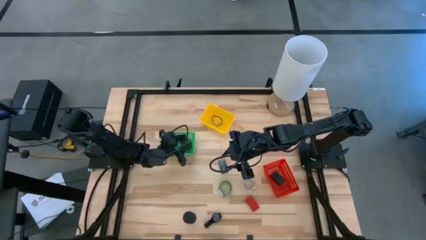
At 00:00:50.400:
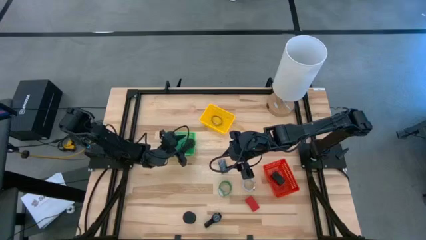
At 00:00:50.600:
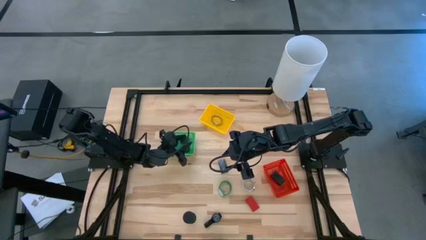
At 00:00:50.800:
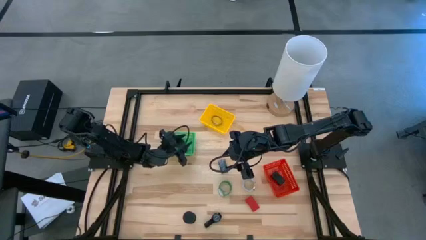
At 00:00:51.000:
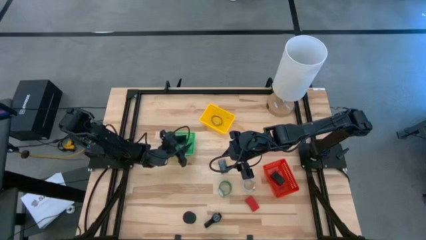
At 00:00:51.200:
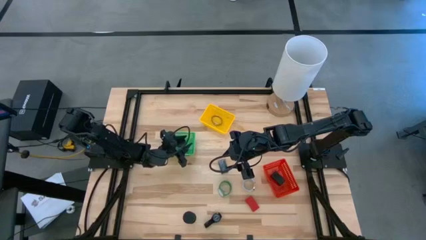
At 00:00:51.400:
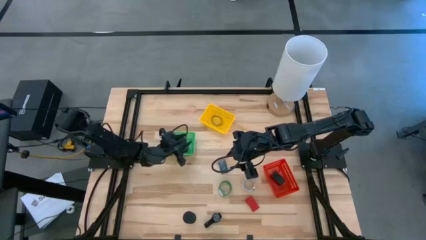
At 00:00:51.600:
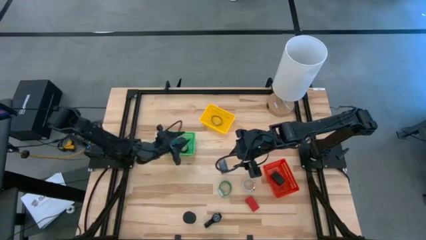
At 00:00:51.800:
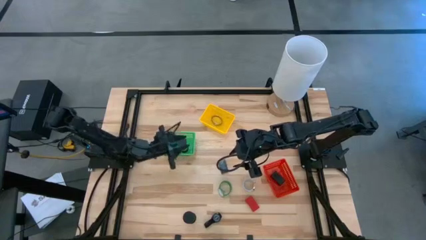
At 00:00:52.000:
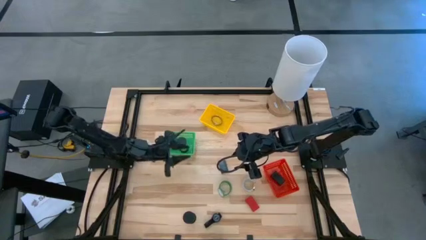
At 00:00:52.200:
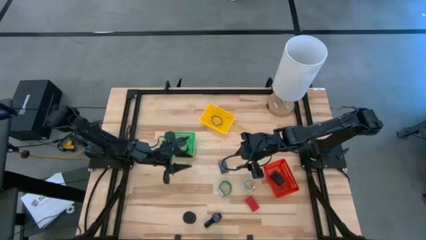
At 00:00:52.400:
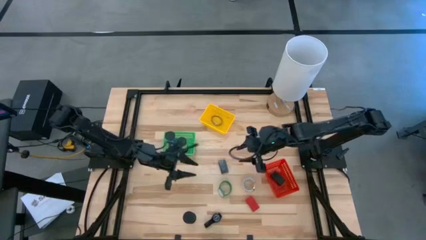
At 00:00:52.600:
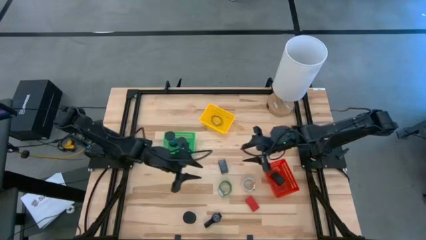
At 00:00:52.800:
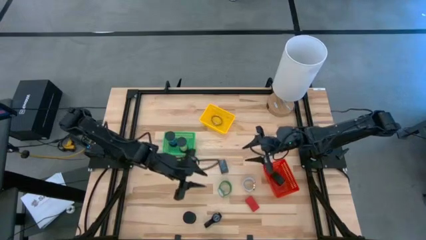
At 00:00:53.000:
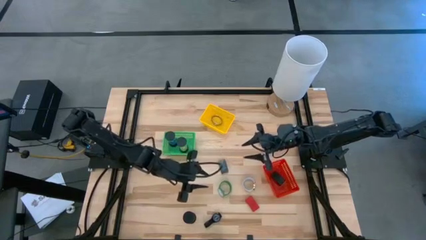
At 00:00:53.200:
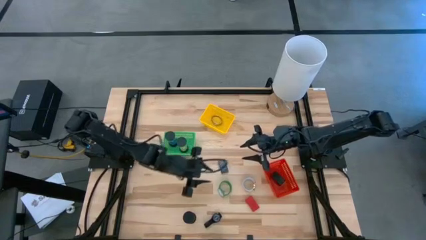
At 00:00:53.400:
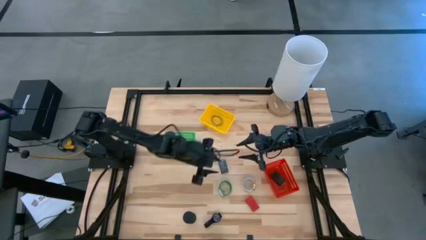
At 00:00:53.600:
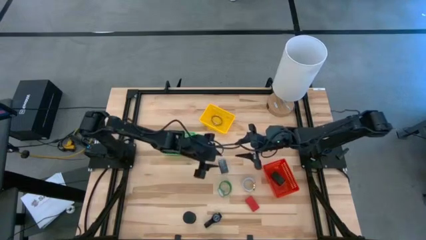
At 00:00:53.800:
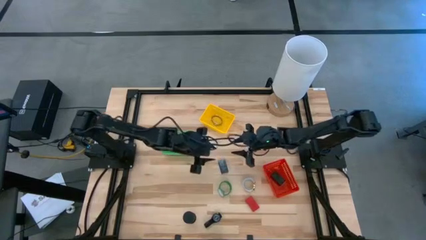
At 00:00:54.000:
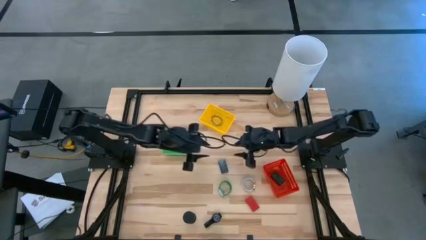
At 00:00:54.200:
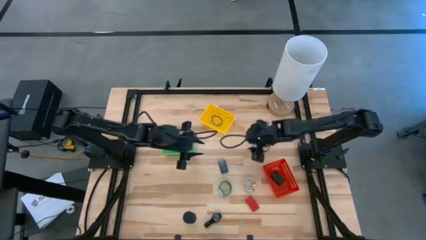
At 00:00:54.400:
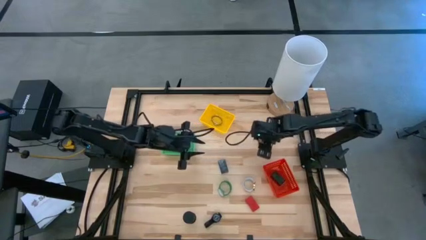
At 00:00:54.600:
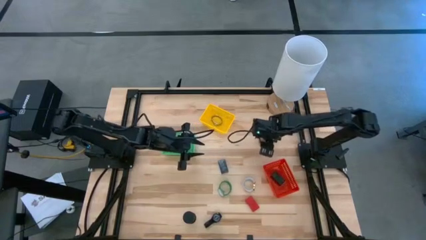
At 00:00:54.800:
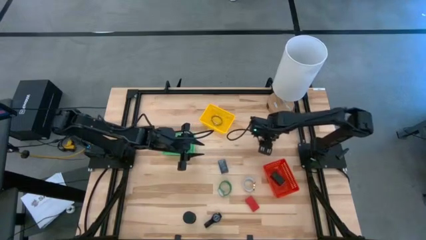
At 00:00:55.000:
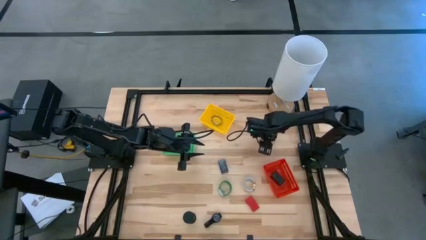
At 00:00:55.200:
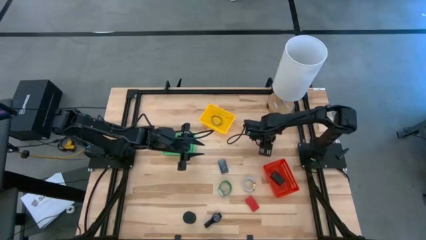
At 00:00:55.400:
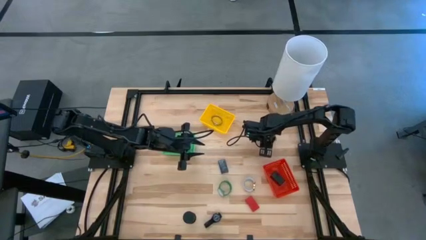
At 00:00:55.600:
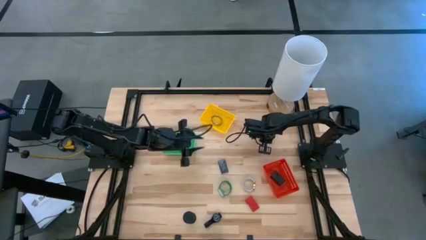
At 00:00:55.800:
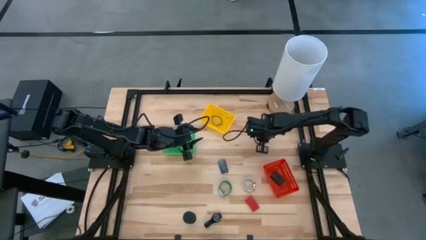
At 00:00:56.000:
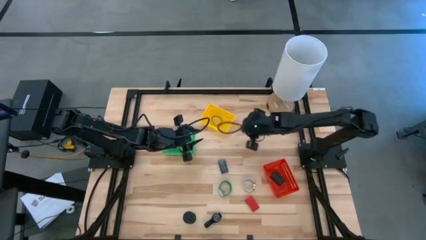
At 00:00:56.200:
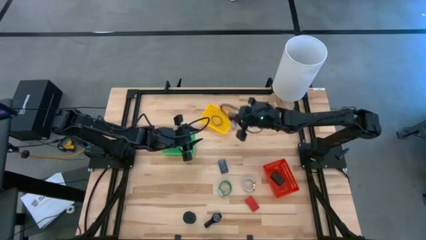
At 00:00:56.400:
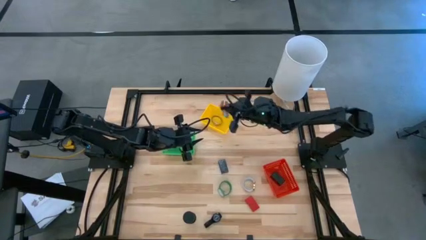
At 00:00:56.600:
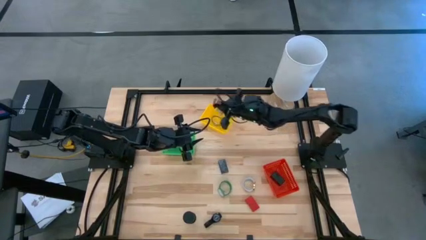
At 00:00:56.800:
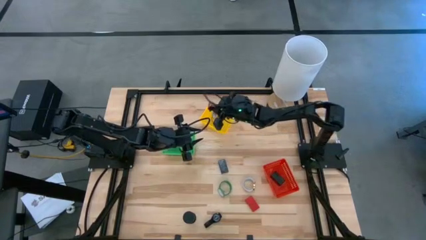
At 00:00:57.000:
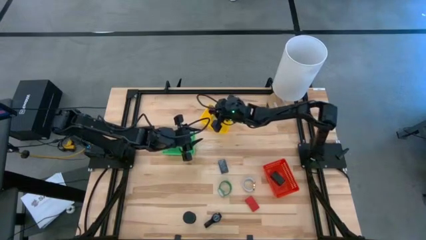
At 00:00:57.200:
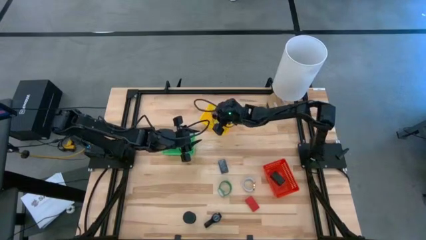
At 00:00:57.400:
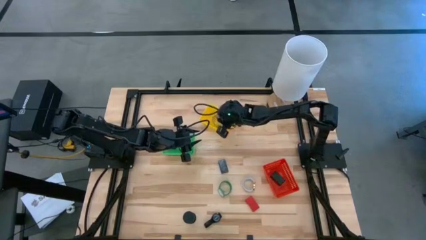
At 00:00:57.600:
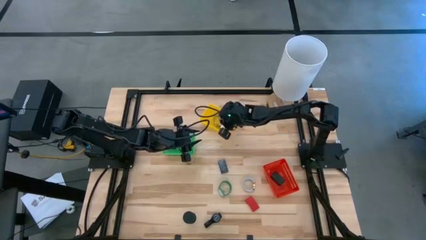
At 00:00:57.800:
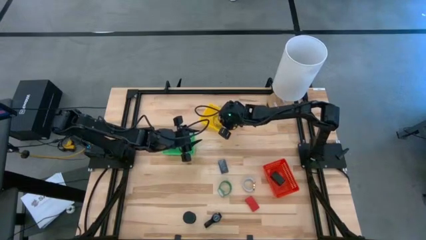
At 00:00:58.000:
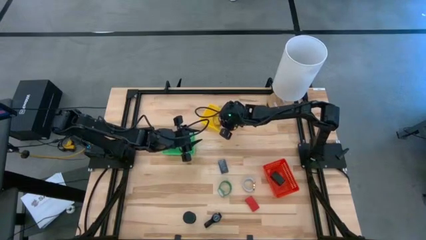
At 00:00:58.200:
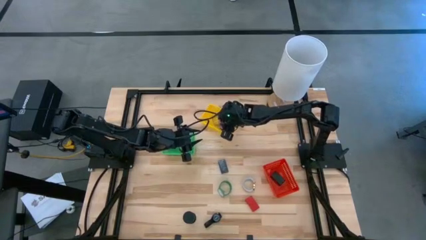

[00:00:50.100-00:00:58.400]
Task: Pick & Place Office items
Put the brown watch into the yellow basket

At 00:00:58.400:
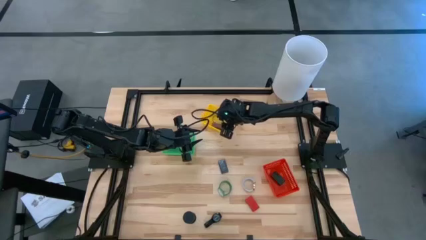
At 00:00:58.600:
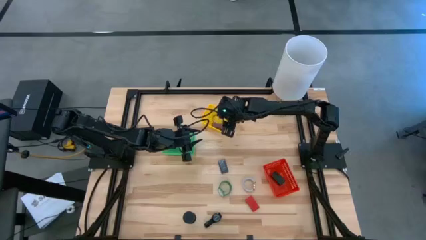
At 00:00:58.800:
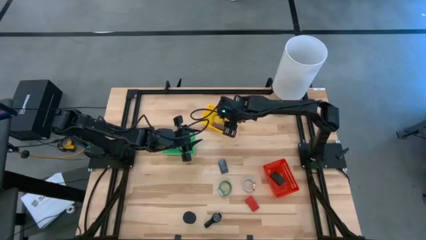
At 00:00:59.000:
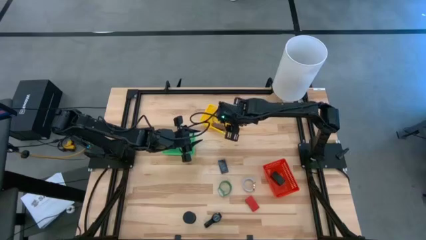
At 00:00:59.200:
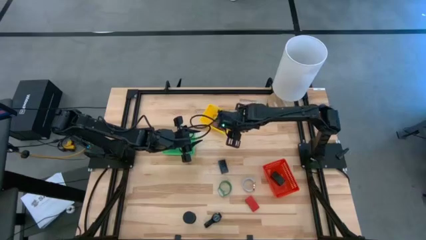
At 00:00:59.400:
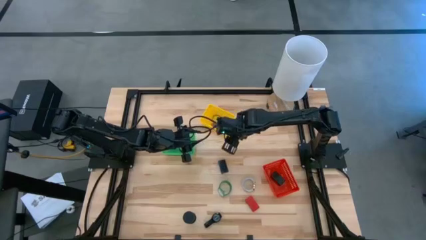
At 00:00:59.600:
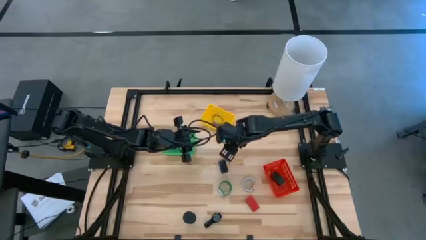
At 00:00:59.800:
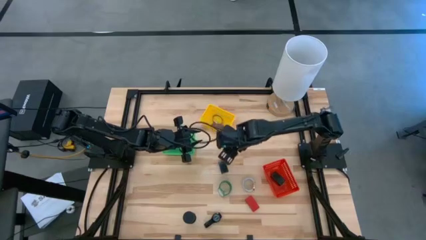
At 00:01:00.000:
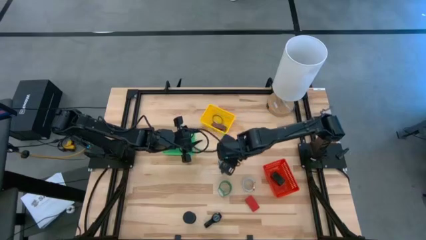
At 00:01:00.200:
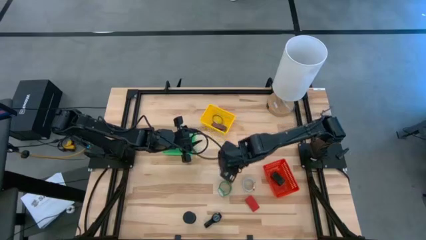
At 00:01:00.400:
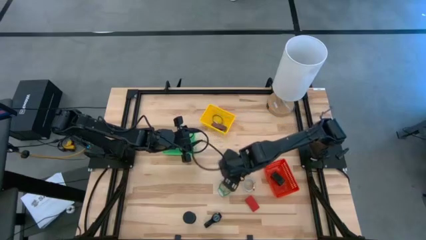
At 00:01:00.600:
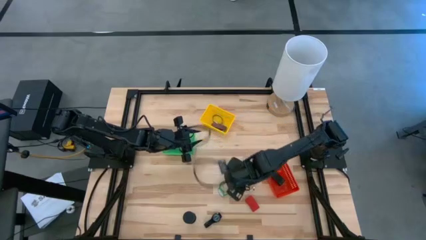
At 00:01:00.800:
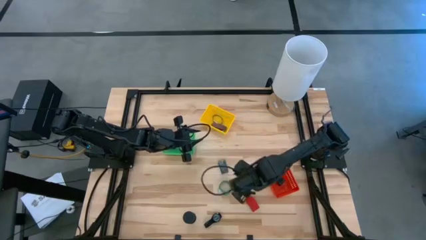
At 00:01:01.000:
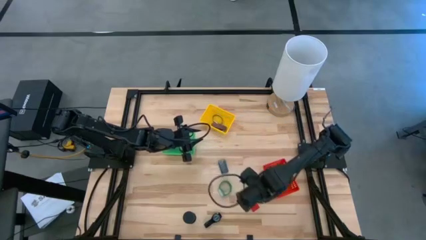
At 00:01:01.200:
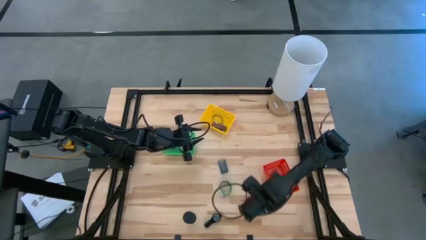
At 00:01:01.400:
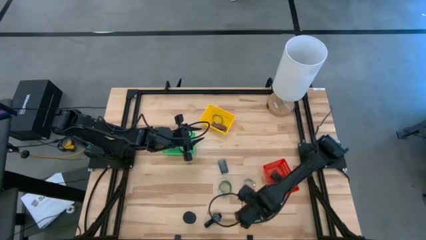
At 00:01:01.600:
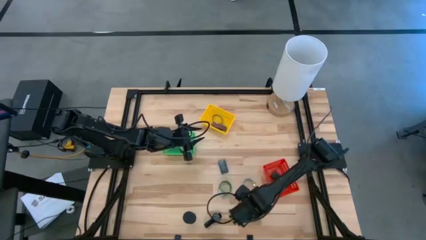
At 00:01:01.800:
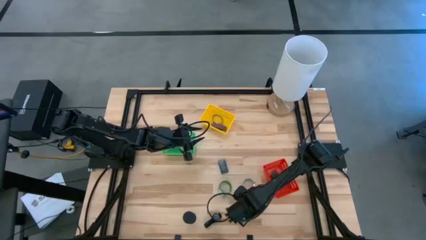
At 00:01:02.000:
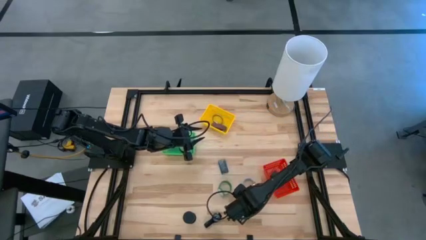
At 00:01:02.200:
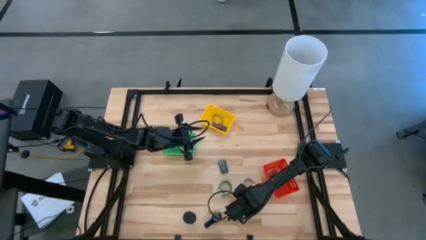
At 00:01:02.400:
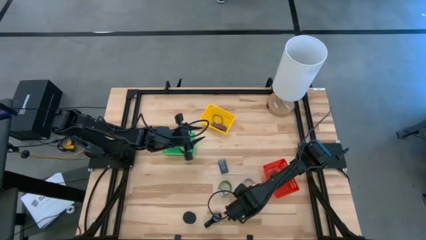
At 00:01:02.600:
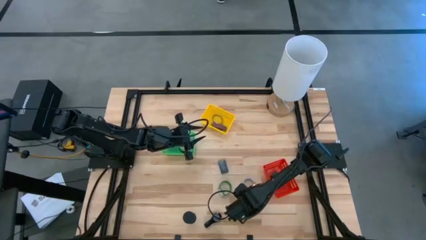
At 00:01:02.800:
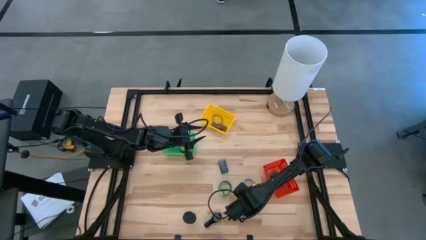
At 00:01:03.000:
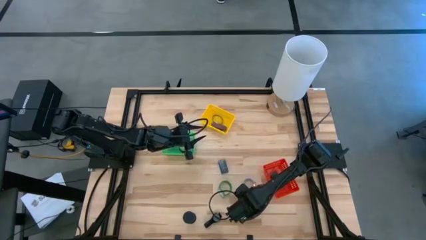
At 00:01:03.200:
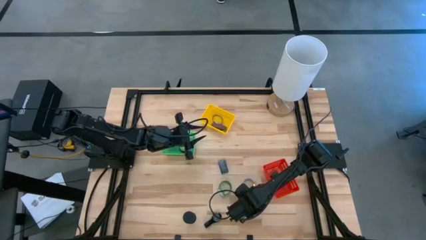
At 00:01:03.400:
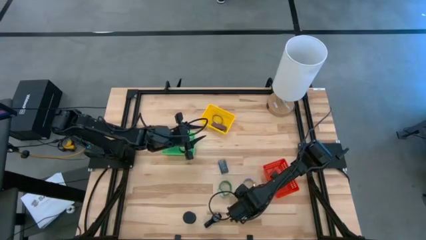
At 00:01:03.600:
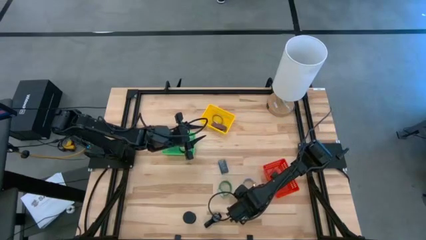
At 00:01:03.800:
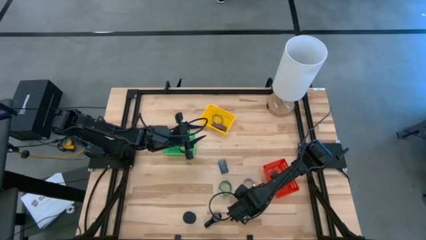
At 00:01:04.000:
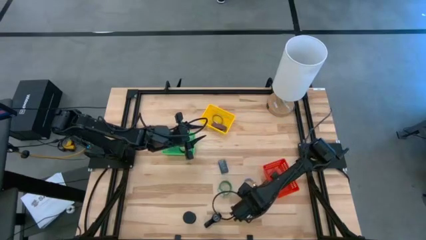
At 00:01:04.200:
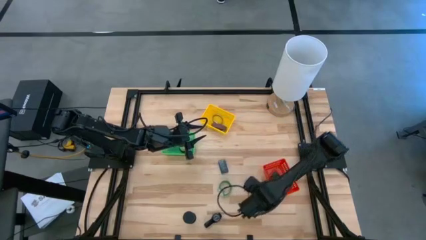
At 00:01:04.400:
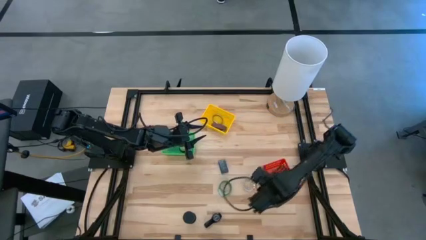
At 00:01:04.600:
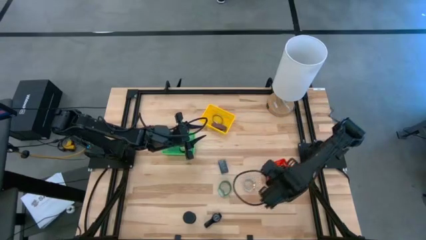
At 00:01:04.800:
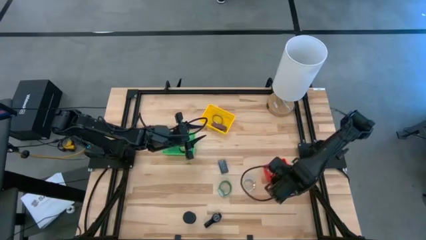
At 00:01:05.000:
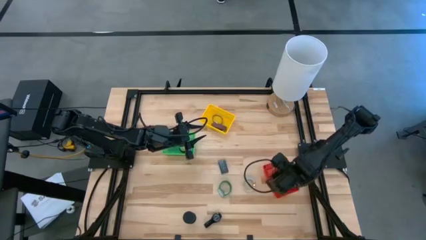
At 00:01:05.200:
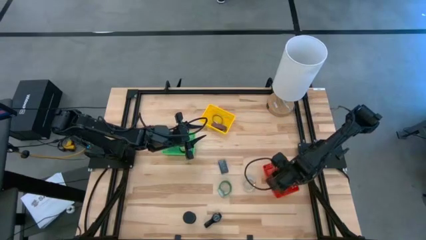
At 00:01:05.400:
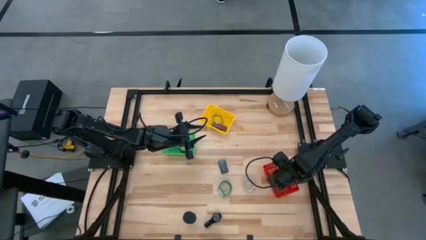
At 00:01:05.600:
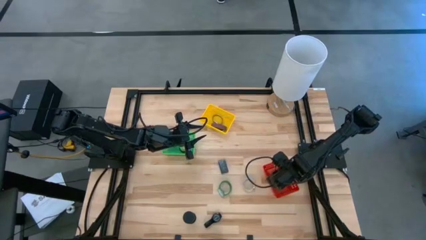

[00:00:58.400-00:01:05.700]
Put the red digital clock into the red basket
